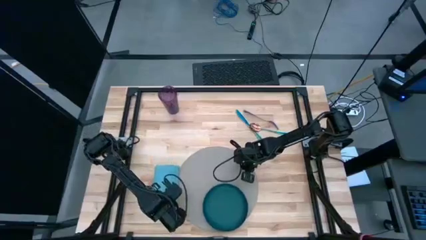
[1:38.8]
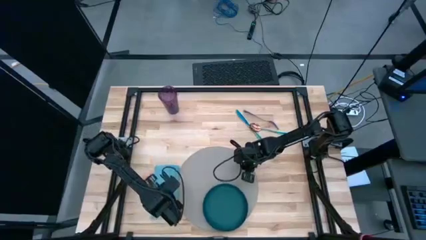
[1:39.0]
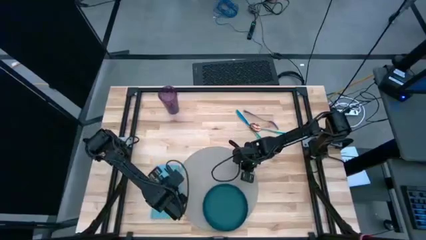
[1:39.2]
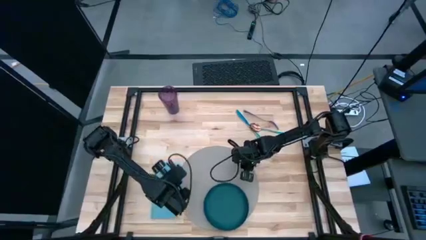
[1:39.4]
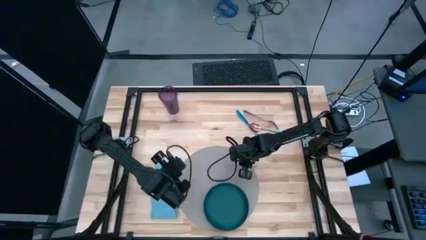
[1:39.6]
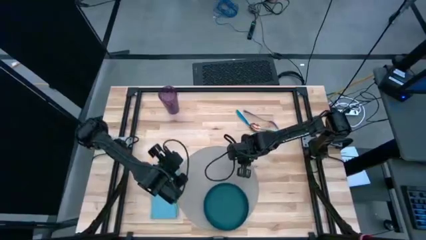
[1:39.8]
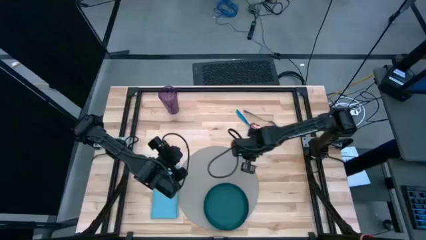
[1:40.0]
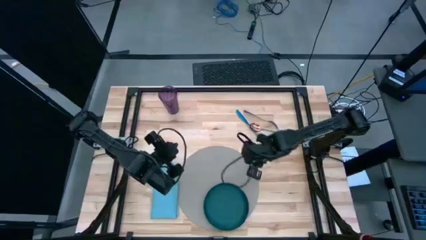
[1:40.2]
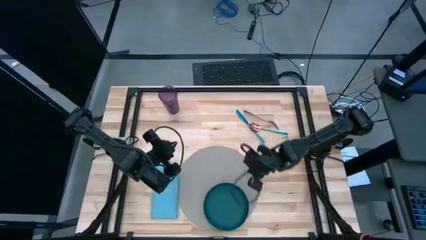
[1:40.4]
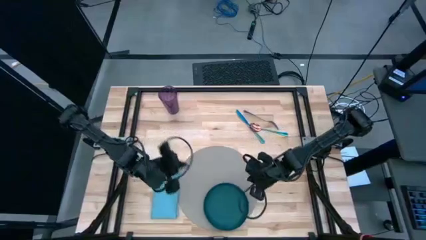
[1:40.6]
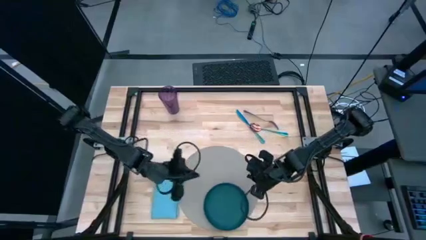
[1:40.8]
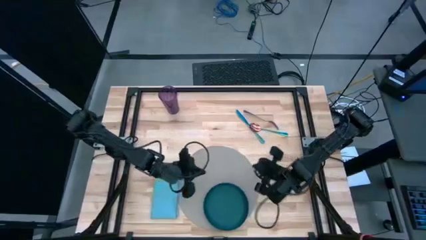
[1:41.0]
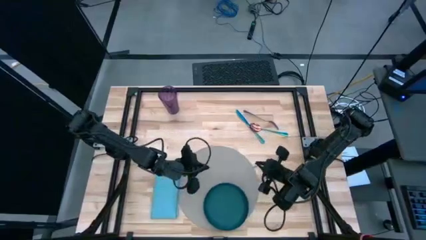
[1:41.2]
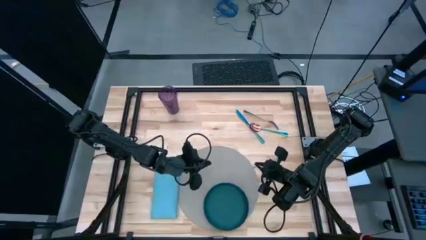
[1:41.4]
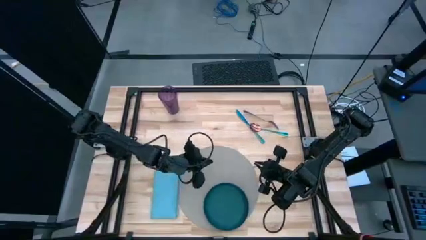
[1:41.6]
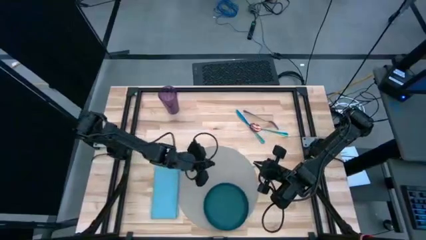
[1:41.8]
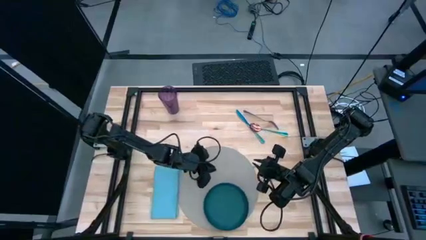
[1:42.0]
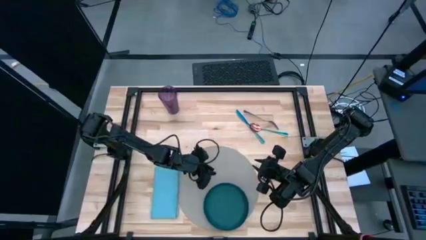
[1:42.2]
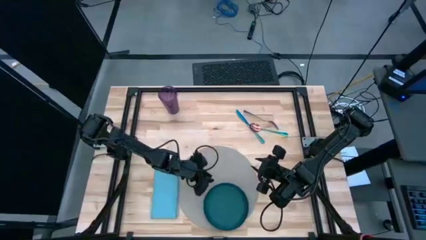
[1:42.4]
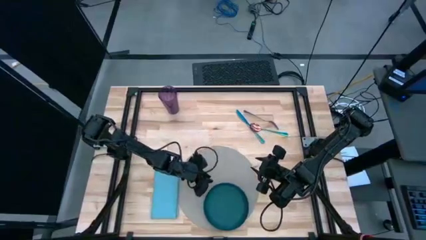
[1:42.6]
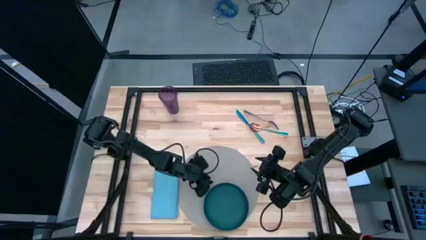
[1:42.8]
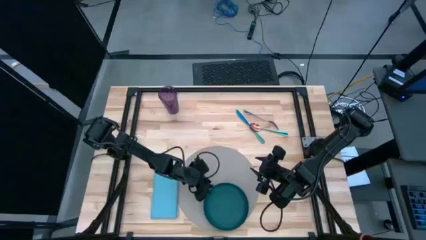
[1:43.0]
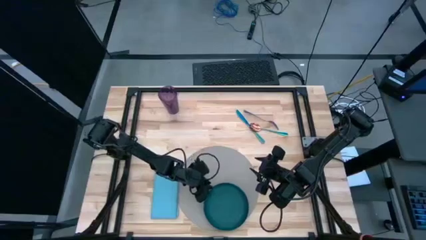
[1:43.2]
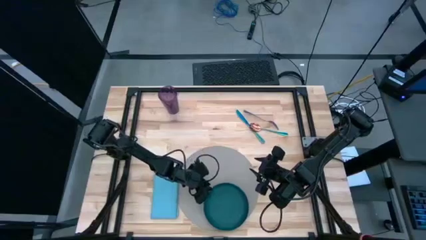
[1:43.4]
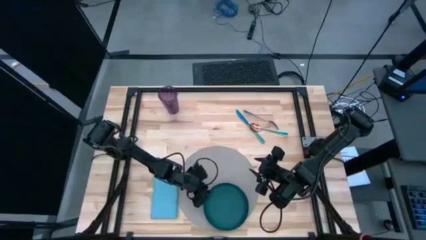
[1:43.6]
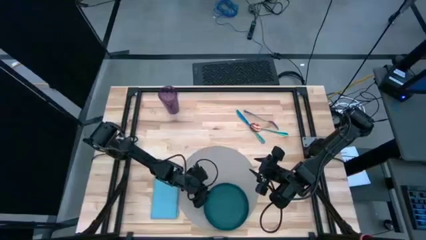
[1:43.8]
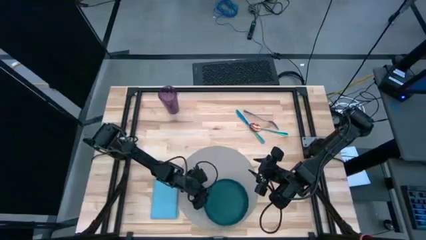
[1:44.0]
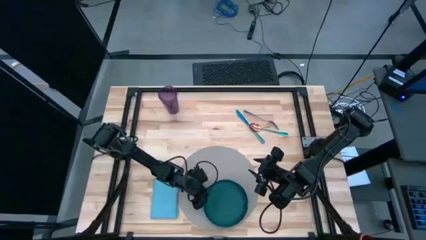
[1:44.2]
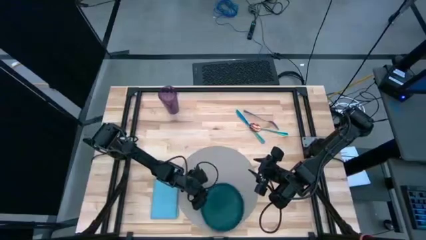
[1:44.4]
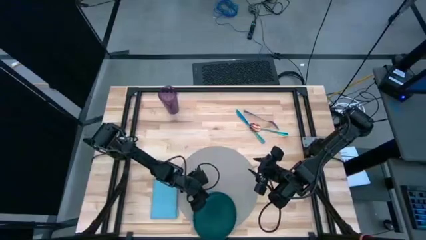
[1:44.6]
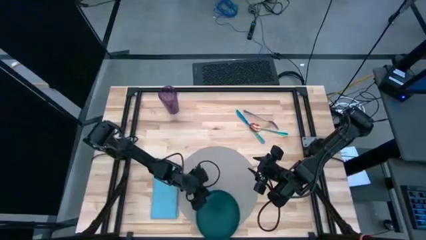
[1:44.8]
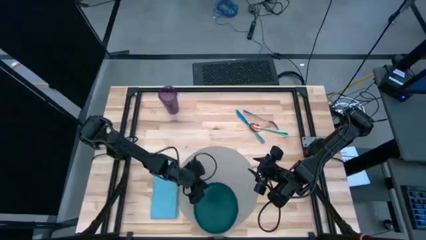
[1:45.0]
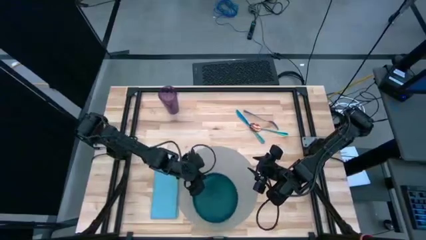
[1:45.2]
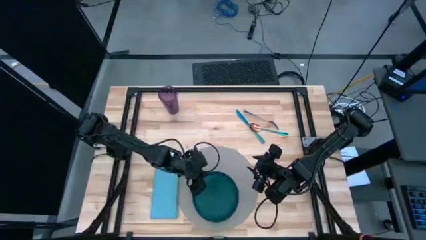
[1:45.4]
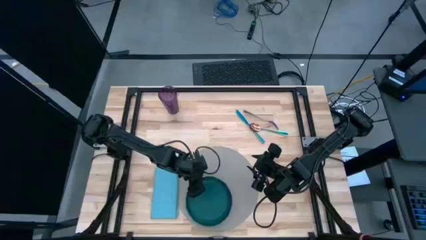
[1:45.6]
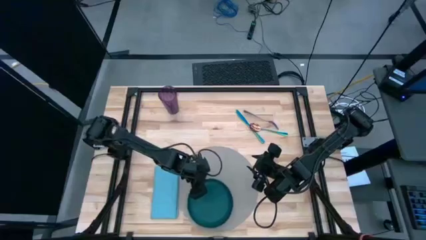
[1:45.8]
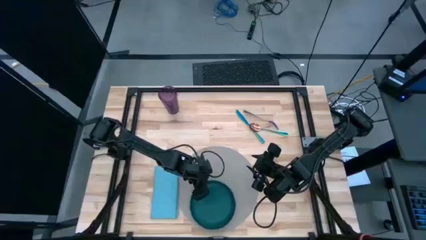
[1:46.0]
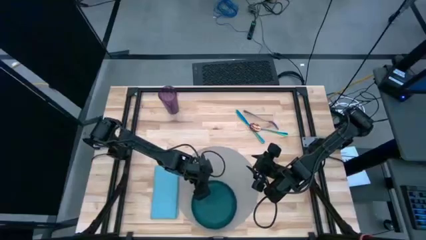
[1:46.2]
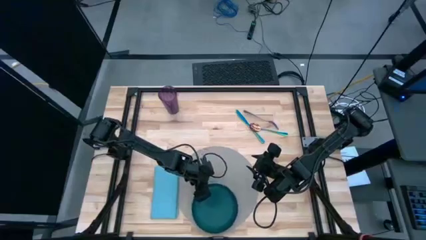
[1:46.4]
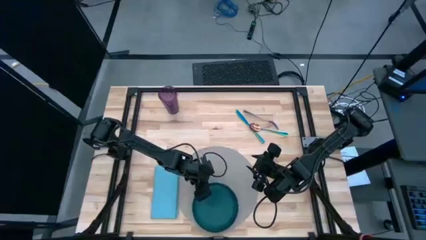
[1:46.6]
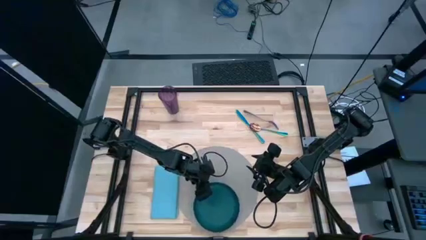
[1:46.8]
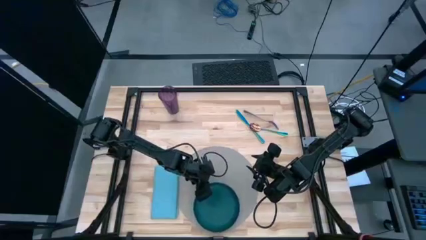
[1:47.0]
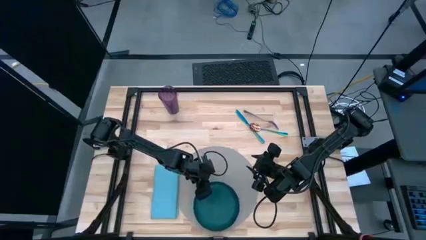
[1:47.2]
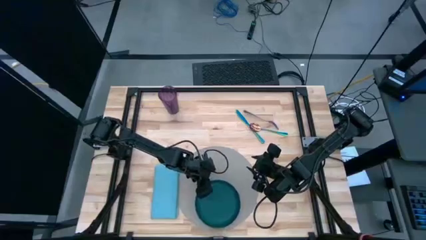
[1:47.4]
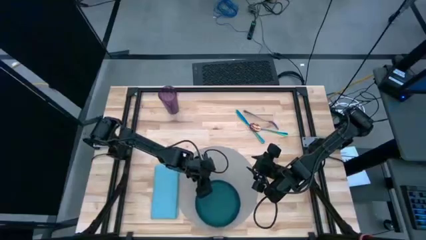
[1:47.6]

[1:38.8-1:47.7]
Task: Set table place
Adjust the green plate on the brown placemat

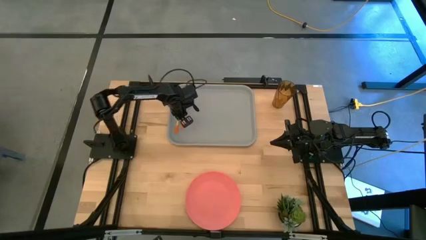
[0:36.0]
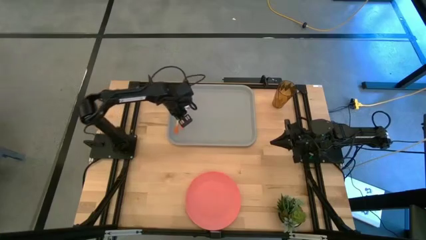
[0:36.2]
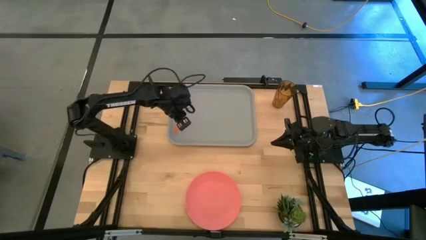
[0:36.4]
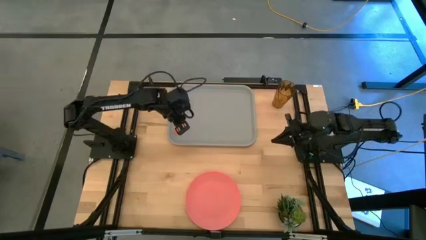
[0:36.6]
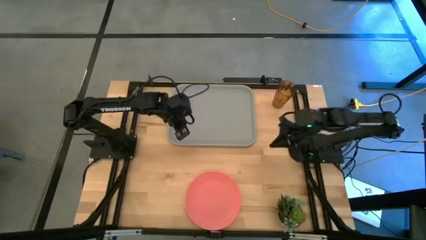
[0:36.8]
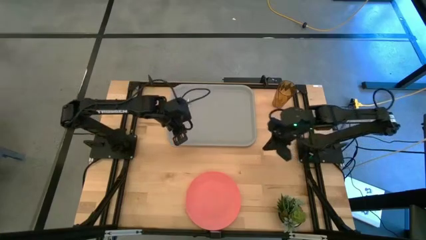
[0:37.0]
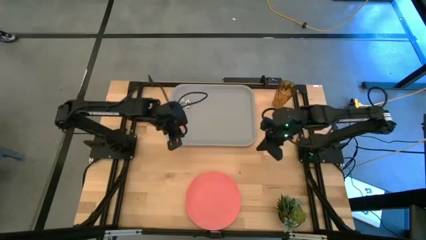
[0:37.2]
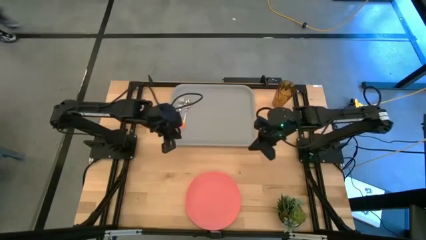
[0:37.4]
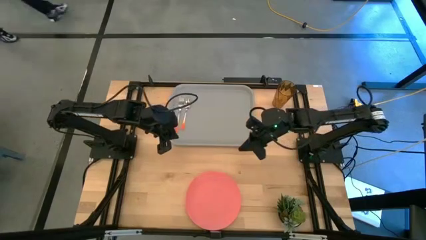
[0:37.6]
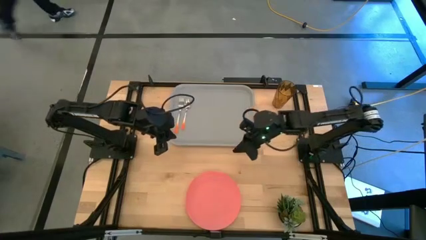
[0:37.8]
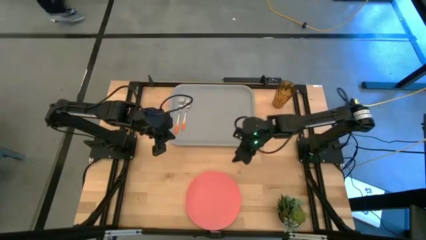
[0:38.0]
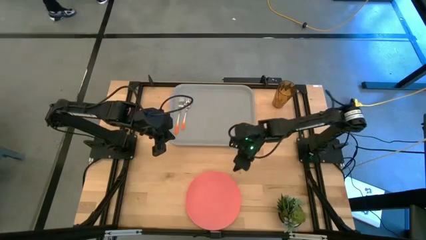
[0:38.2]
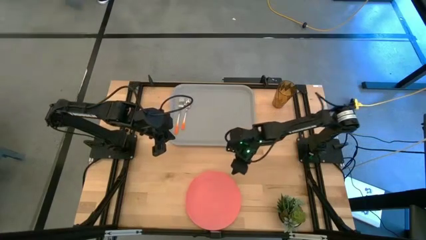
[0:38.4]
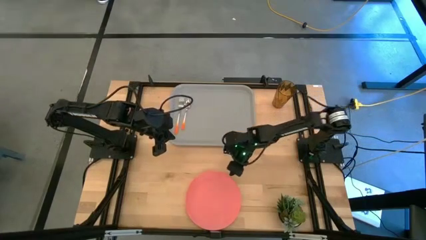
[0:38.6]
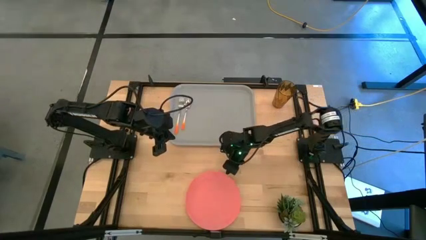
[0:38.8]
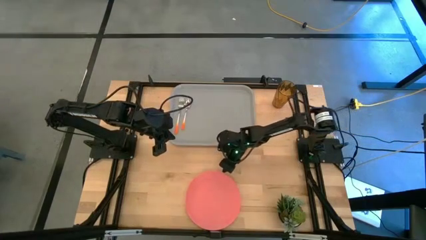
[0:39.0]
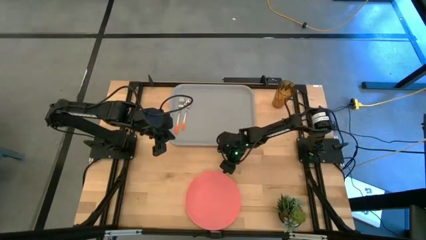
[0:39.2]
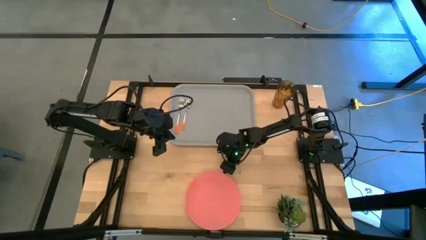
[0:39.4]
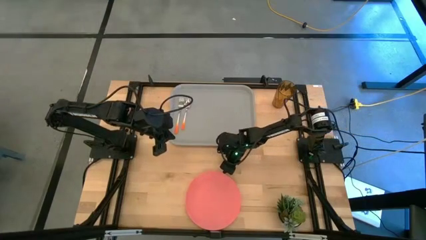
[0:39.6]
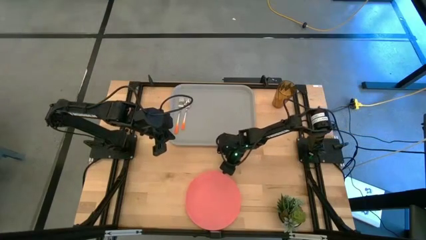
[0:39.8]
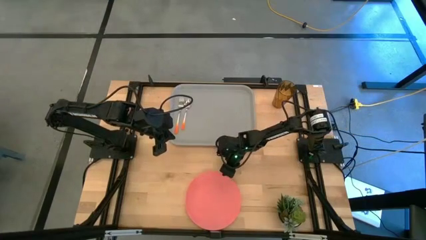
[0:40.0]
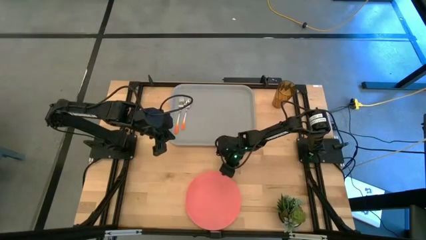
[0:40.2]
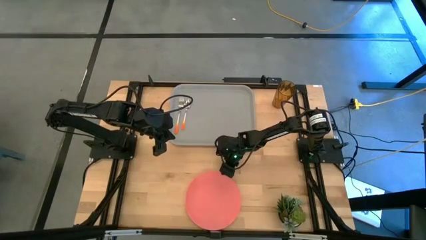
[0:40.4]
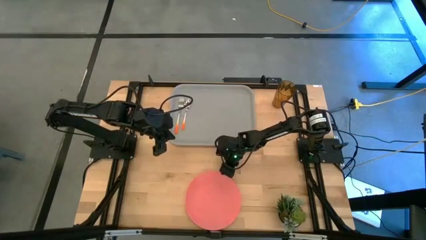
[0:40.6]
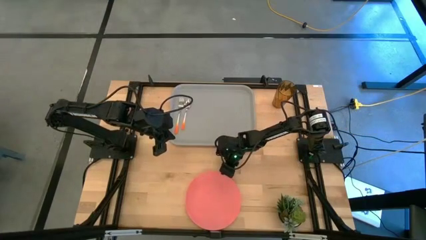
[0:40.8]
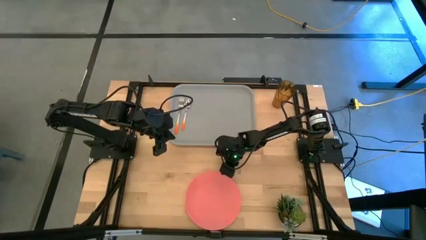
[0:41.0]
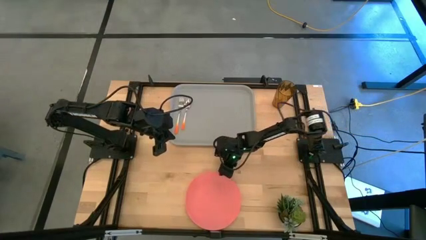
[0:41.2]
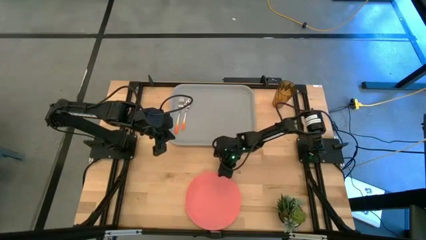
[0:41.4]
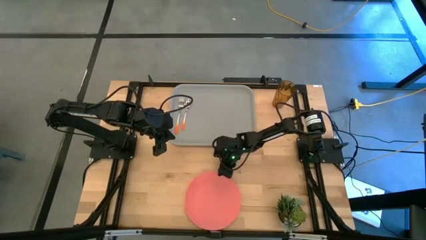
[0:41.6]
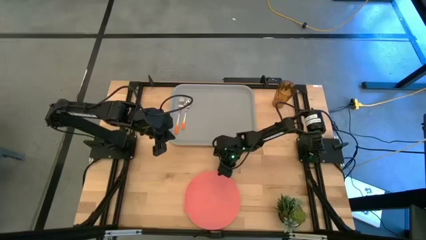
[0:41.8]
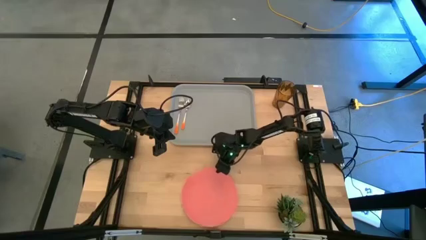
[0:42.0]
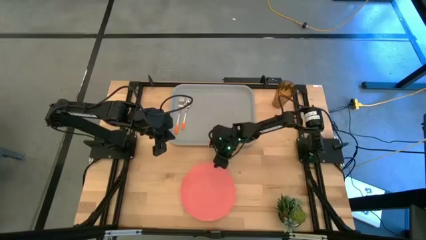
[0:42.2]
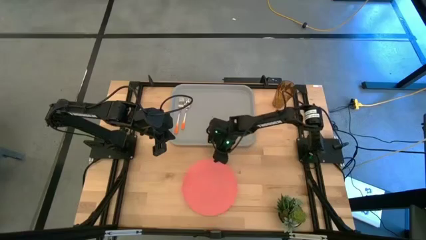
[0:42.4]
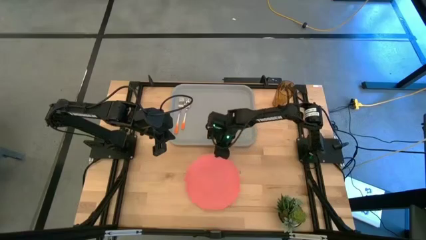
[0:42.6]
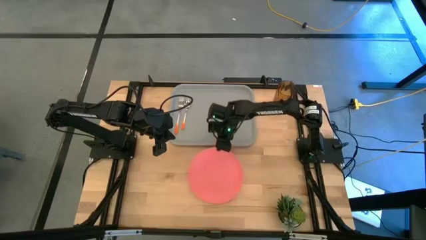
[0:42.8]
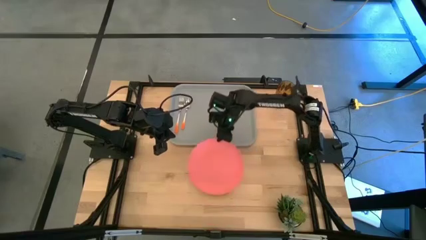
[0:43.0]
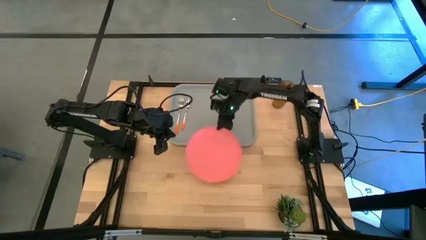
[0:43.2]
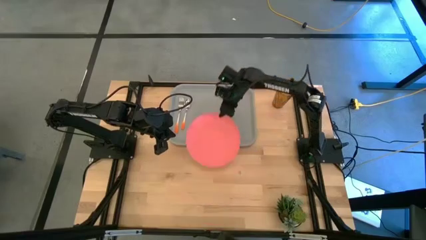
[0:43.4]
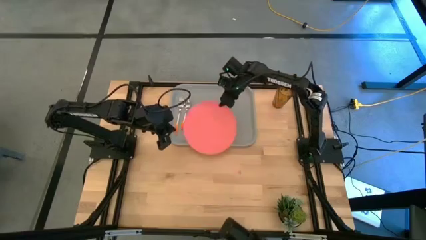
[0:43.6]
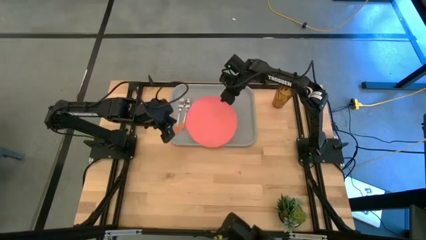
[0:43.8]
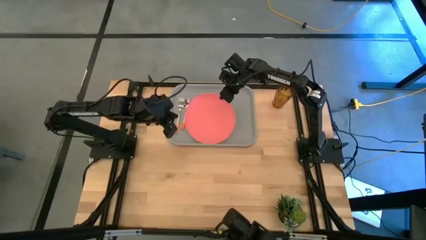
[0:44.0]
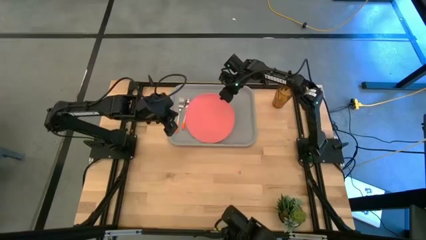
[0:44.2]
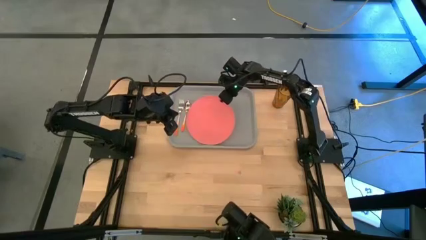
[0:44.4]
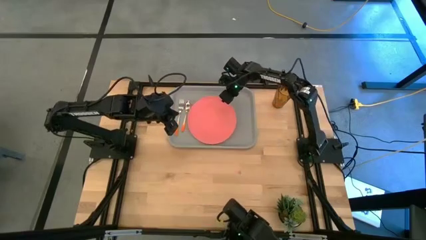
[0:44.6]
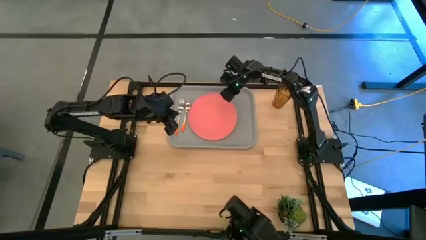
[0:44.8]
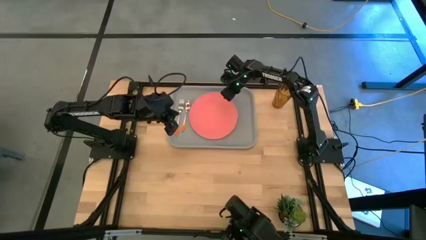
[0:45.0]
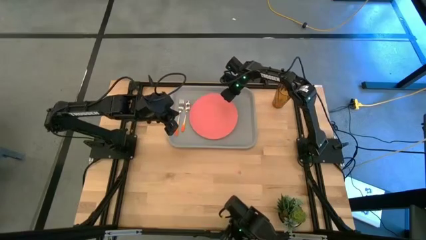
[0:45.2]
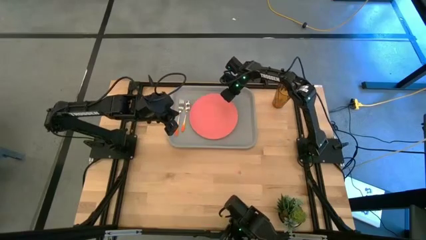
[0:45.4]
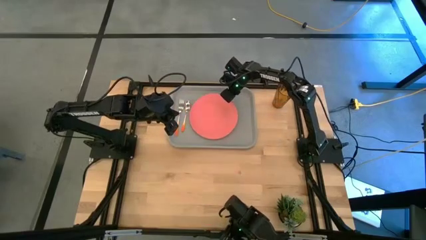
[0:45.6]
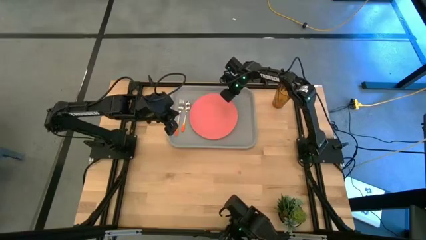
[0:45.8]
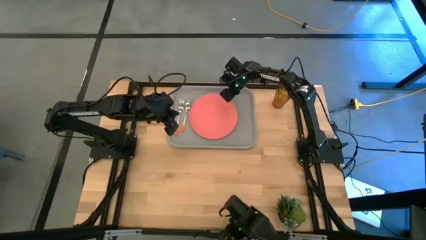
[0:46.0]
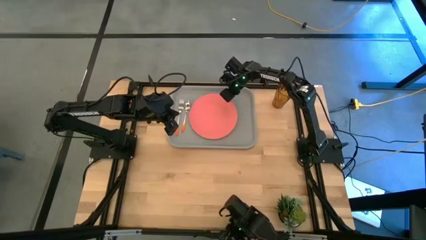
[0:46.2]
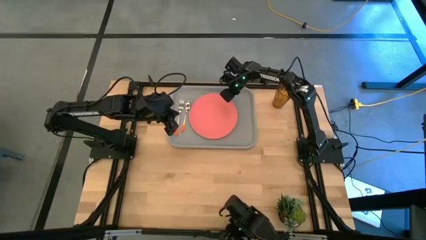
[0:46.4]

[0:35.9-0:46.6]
Task: Pick and place plate/cup/fork/spoon on tray
Put the pink plate on the gray tray
